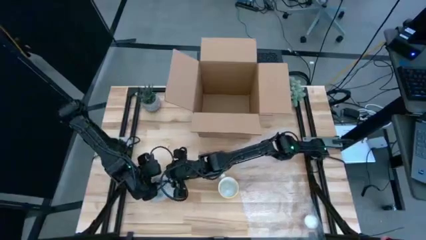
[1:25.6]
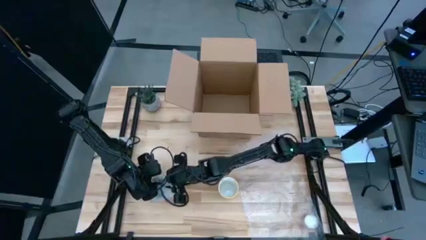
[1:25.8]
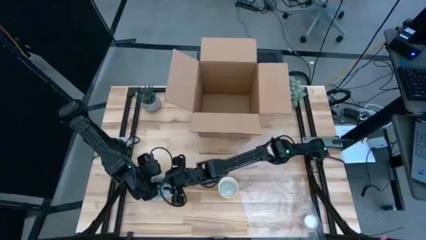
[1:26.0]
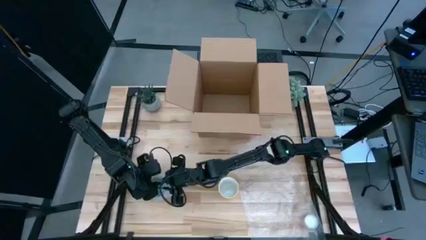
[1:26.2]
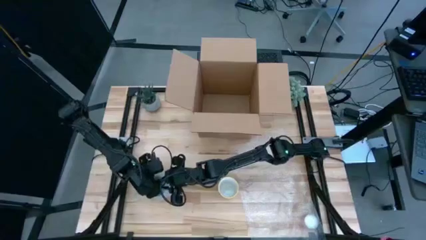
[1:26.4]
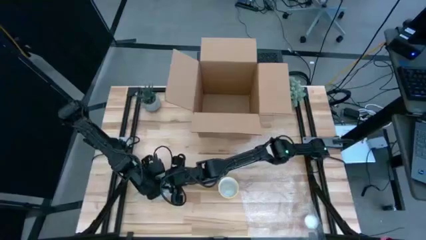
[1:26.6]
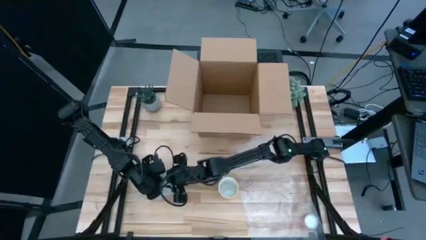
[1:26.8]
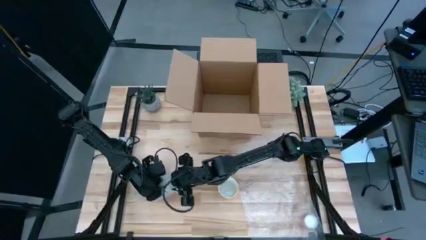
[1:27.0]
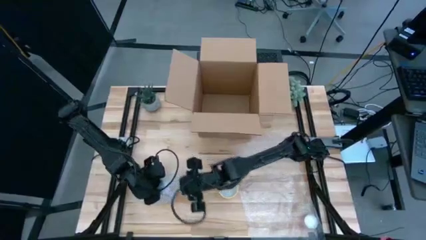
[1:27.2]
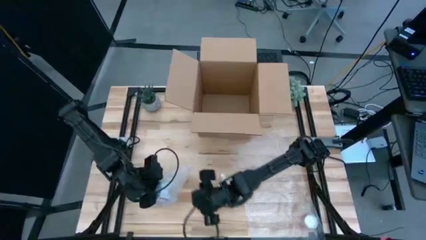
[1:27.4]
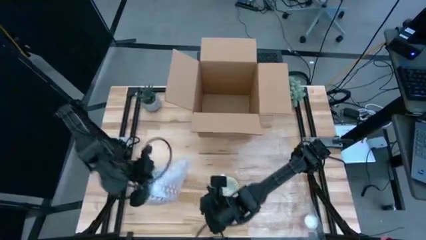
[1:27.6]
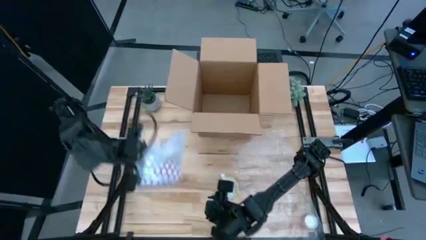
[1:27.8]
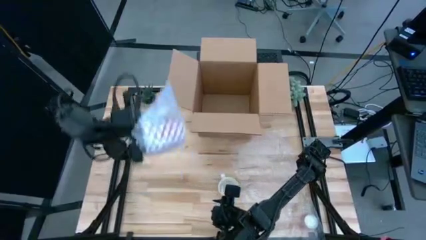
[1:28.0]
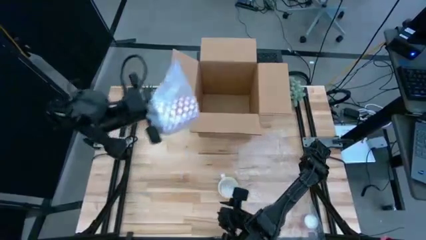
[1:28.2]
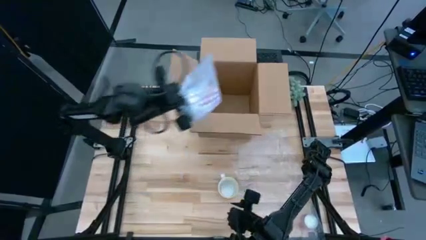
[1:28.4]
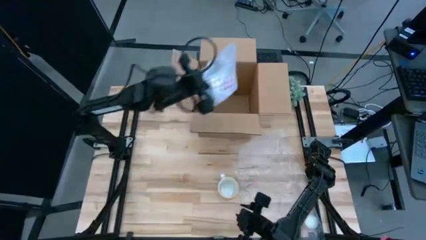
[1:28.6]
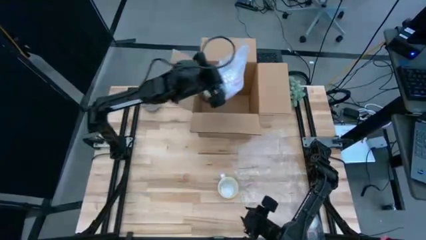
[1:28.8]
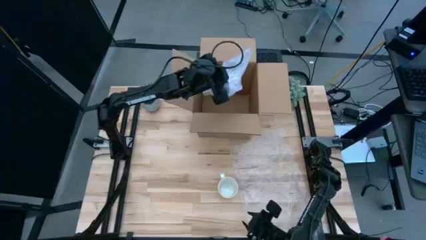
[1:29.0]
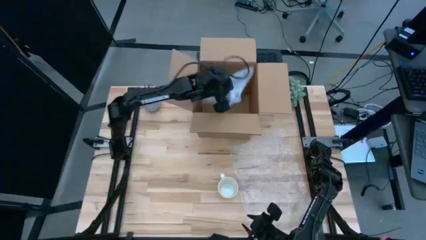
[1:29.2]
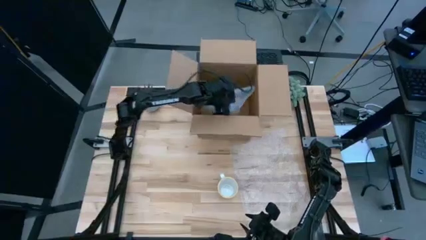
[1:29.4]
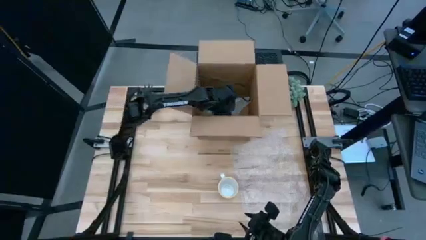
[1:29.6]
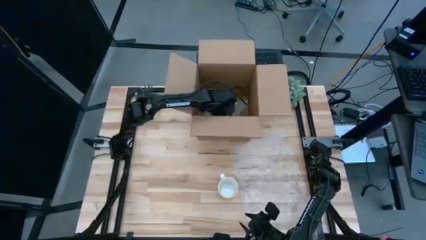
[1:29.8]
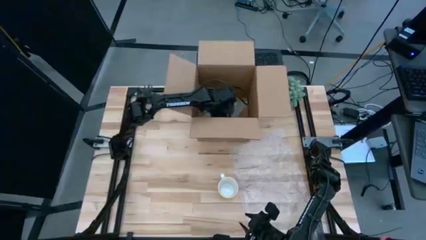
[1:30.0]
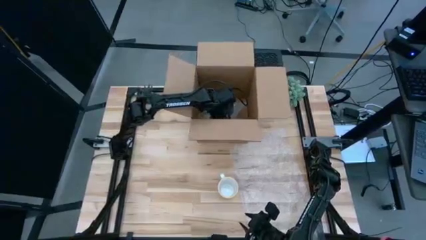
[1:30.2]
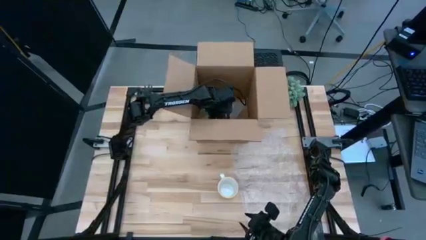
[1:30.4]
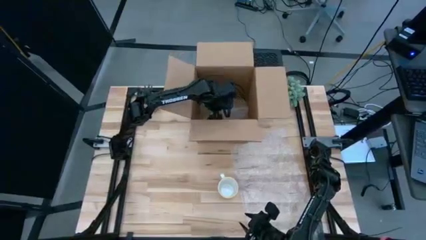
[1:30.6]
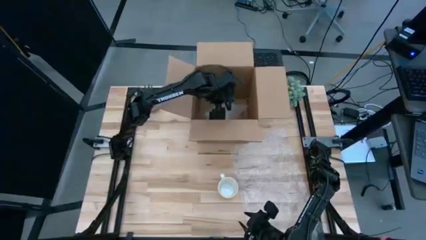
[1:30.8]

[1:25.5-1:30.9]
Task: wrap mug
Put the wrapped red mug into the cardboard box

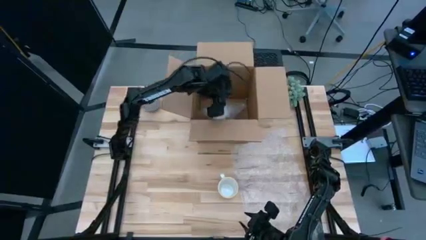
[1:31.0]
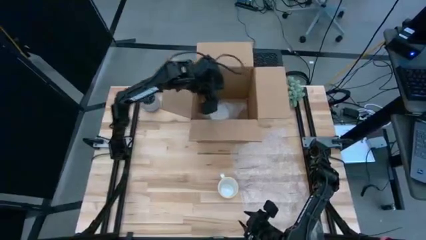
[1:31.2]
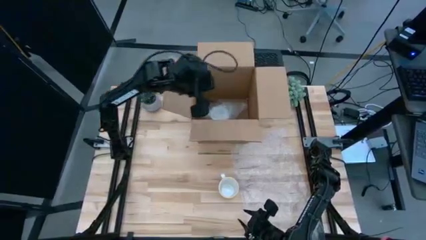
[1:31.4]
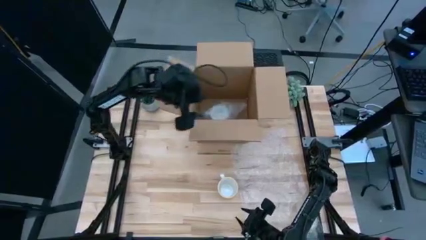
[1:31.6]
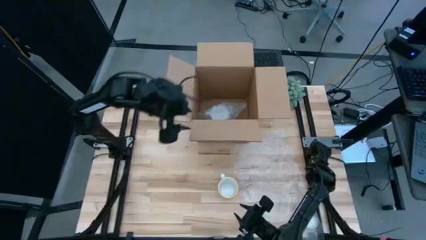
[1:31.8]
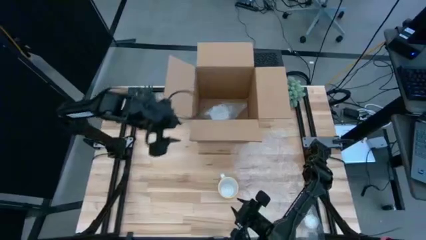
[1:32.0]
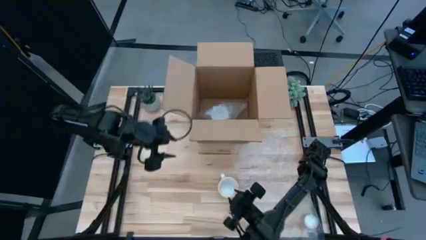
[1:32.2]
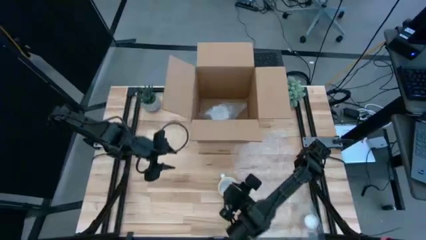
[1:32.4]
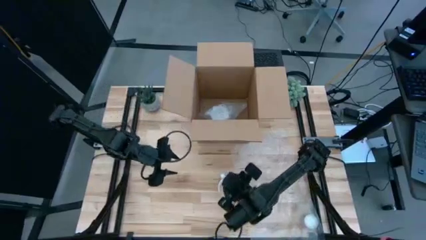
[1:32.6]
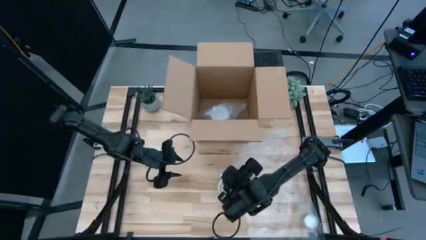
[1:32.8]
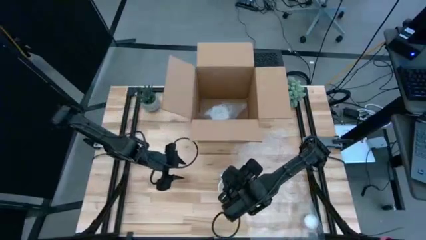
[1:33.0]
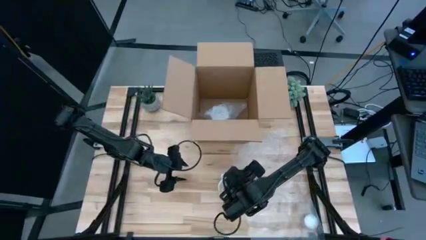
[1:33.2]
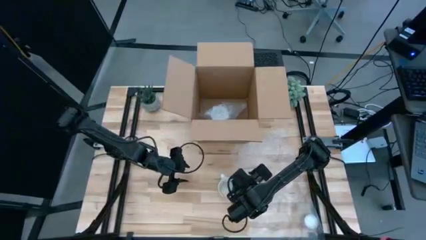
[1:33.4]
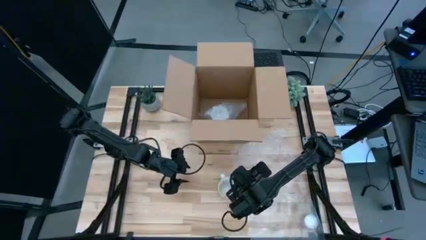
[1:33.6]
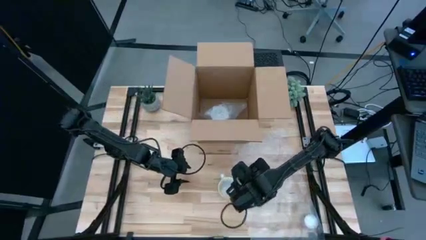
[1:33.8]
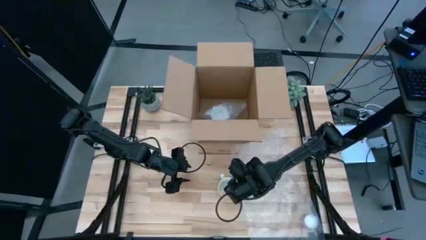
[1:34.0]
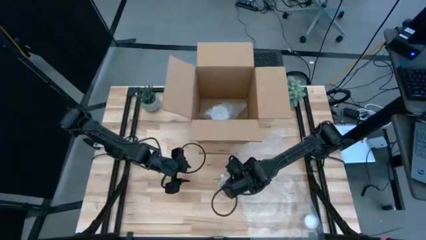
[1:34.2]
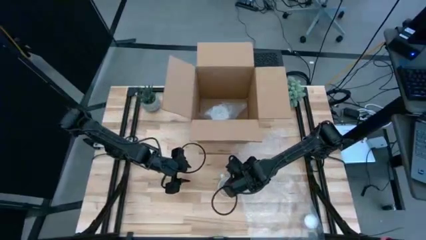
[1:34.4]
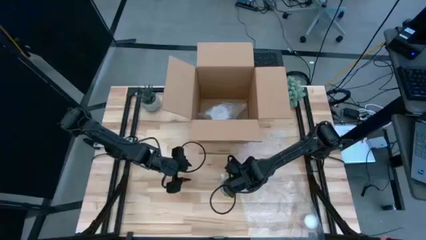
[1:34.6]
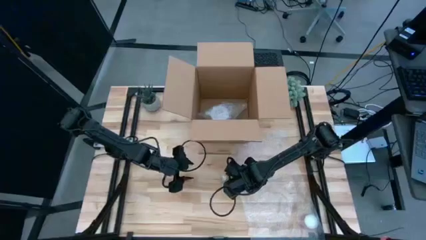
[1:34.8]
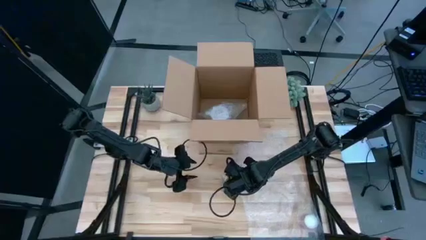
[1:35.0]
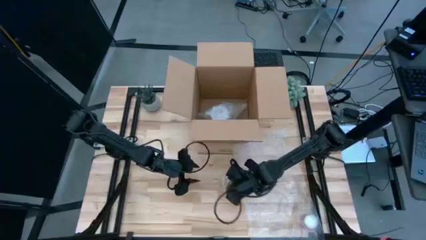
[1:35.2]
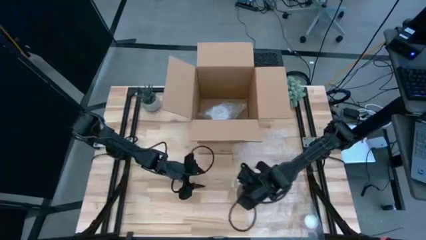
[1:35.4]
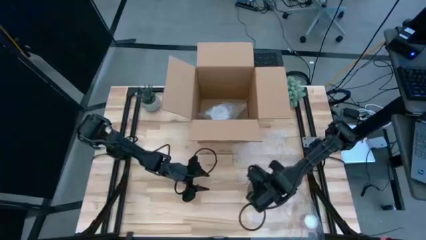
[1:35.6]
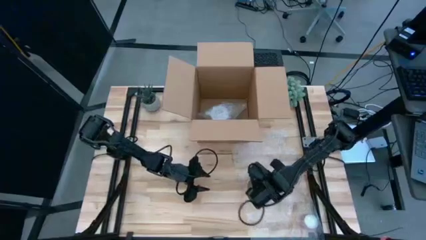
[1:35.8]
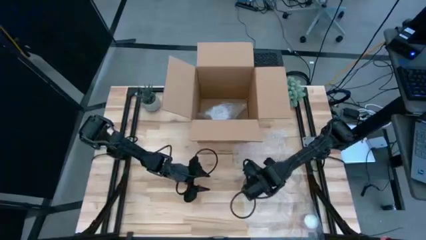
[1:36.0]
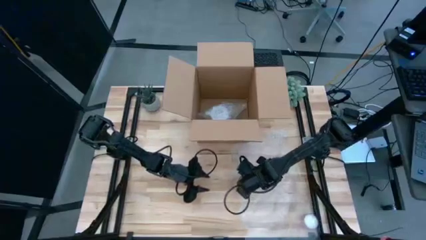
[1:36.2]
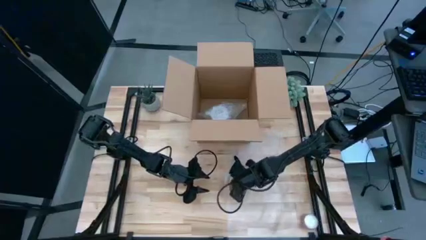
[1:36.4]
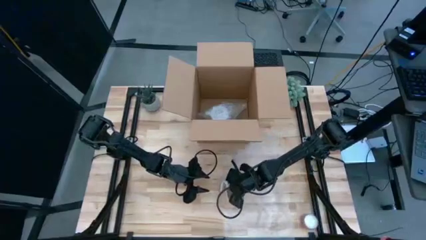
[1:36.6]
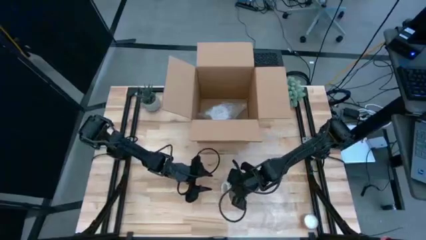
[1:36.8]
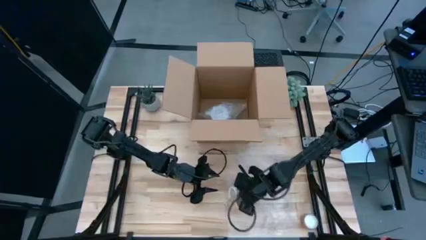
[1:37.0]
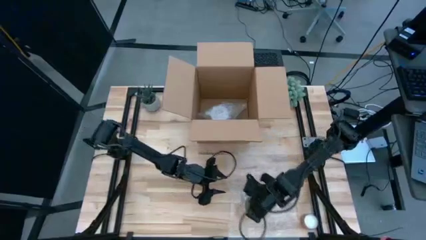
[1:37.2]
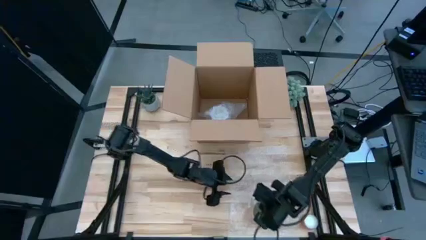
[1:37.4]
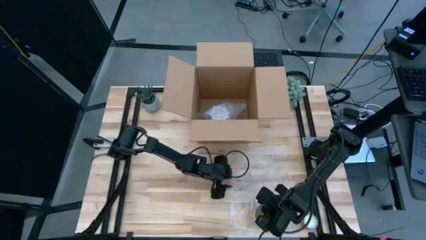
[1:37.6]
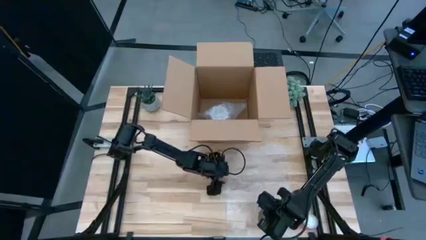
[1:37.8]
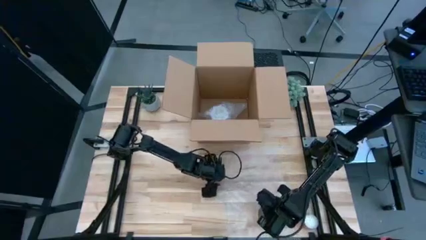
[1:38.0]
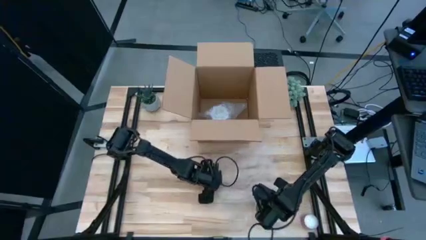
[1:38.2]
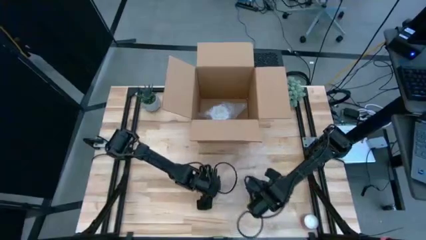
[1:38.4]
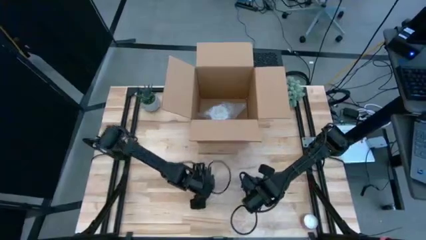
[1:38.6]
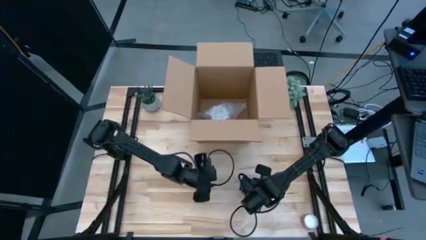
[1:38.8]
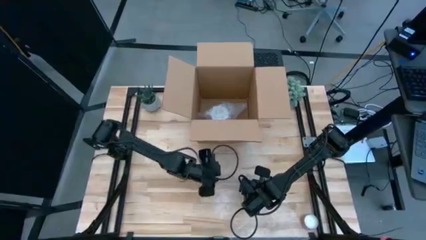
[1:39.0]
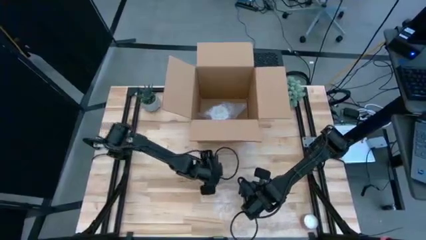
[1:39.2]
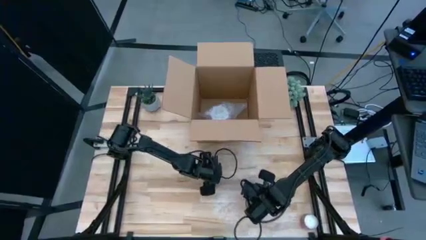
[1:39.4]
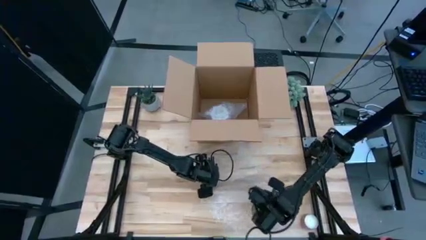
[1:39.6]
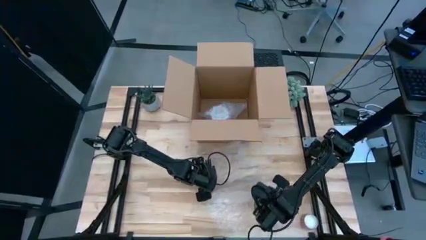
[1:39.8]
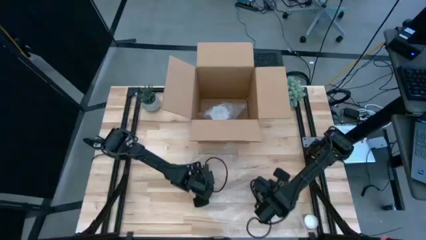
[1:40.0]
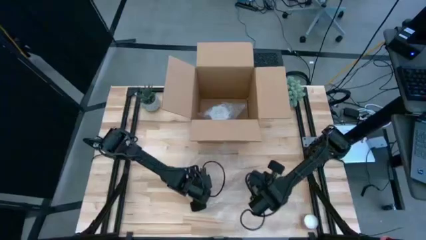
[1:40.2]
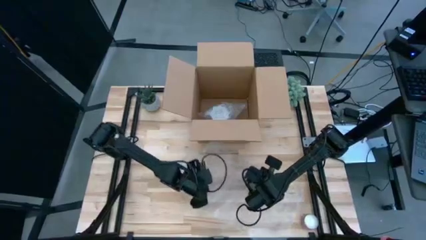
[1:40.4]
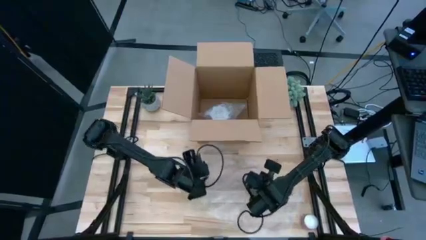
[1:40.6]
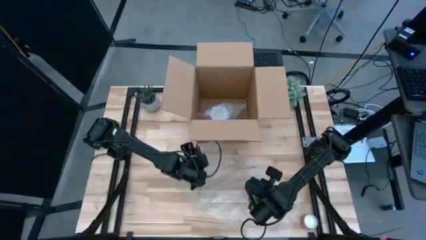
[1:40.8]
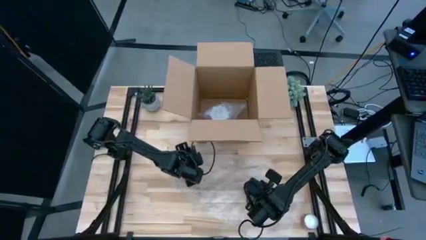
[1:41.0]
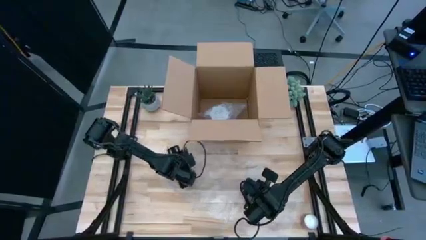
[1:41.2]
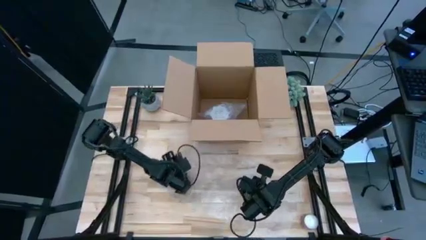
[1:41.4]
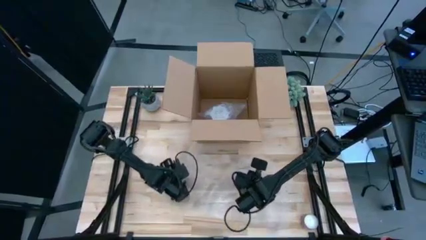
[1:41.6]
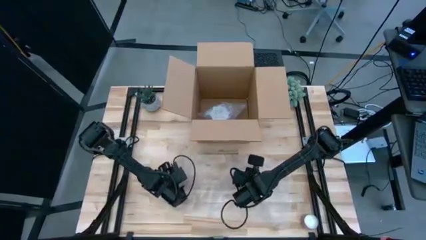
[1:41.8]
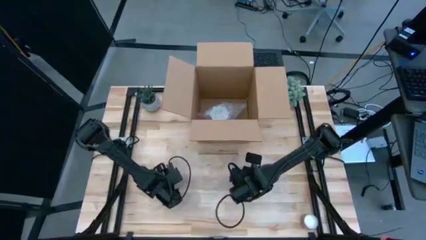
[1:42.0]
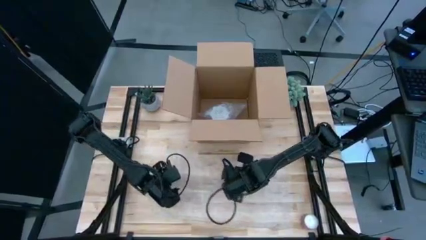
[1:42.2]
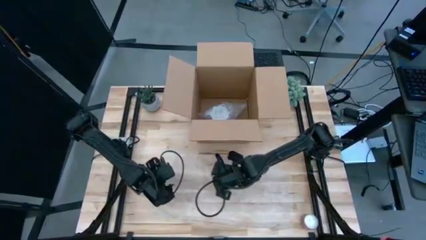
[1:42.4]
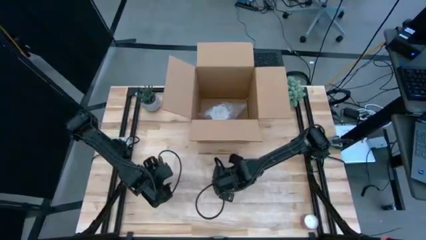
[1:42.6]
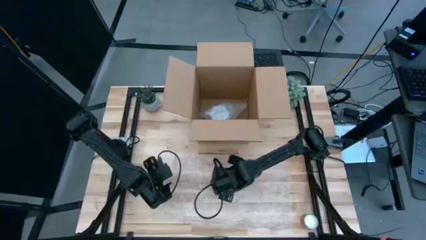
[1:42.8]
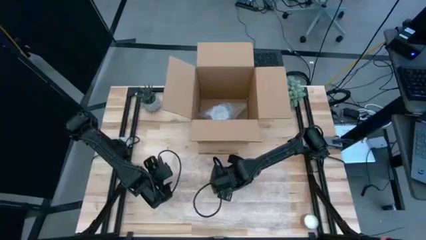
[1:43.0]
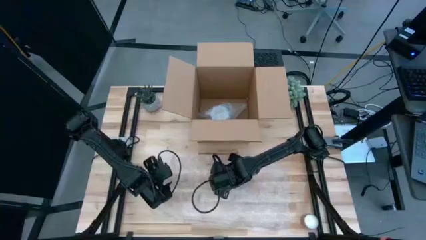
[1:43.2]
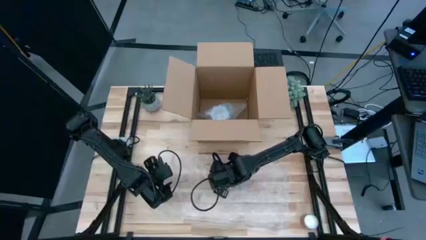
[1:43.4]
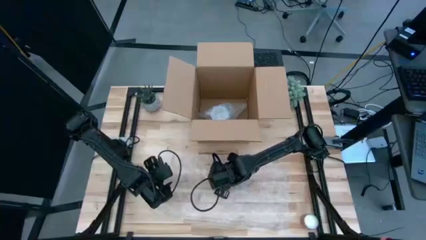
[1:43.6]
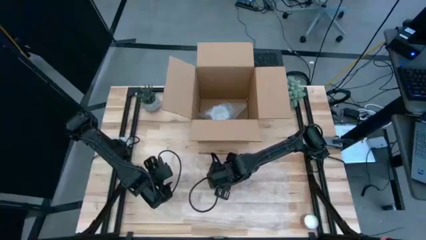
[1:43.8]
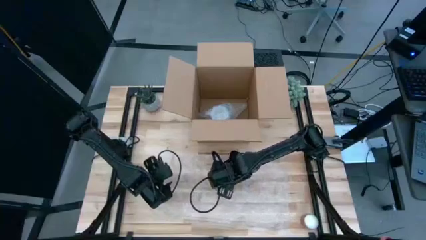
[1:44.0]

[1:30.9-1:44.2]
Wrap the orange mug with the bubble wrap
